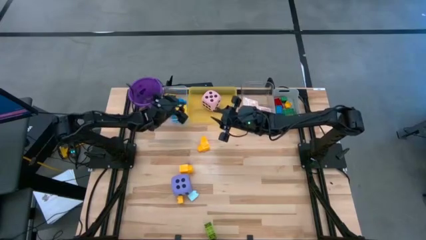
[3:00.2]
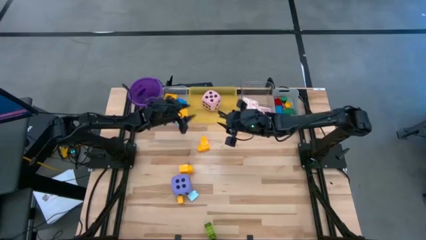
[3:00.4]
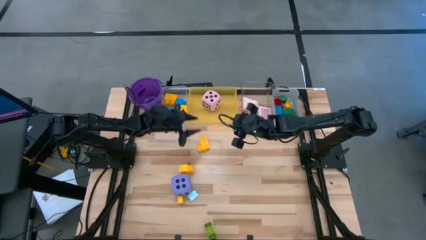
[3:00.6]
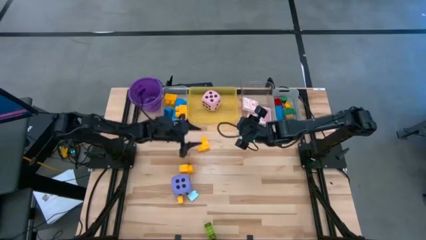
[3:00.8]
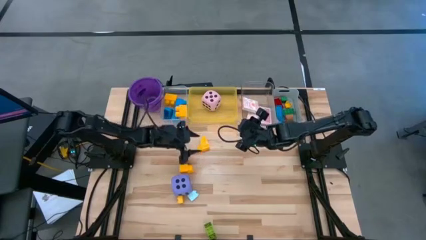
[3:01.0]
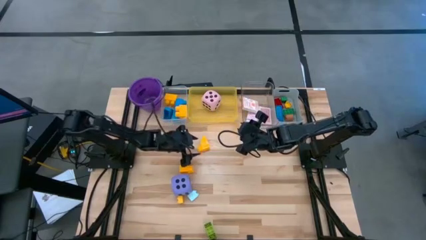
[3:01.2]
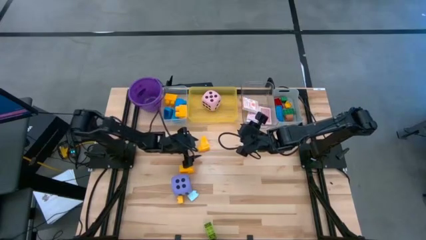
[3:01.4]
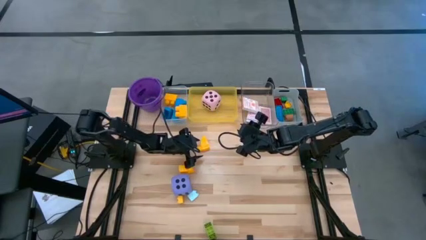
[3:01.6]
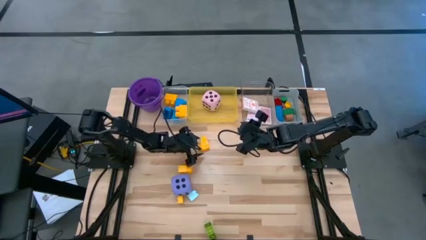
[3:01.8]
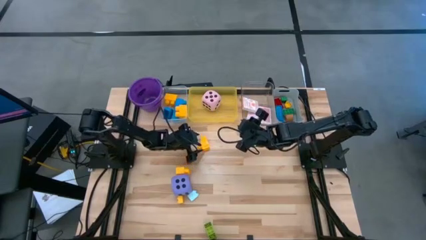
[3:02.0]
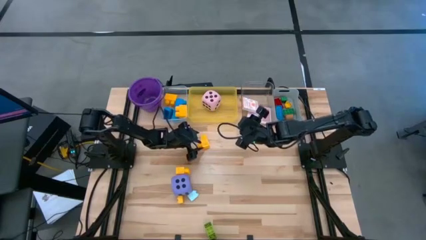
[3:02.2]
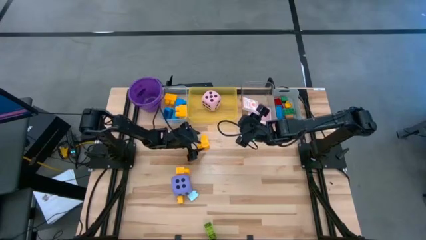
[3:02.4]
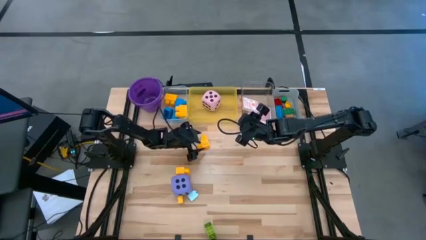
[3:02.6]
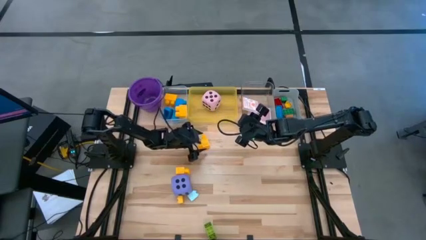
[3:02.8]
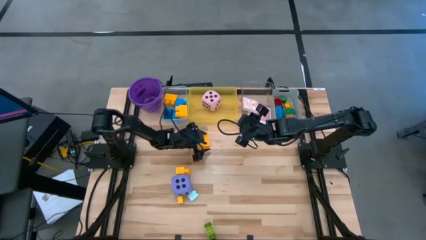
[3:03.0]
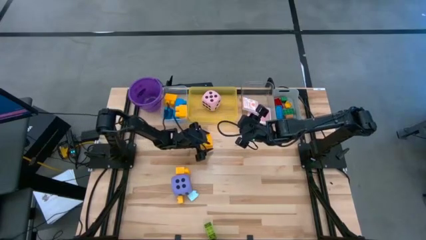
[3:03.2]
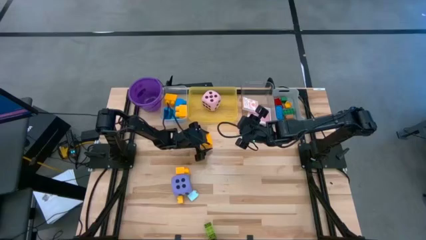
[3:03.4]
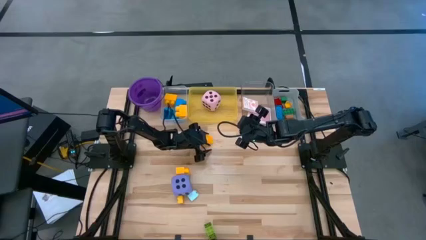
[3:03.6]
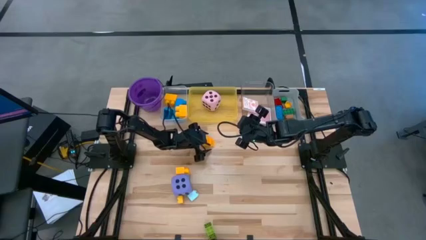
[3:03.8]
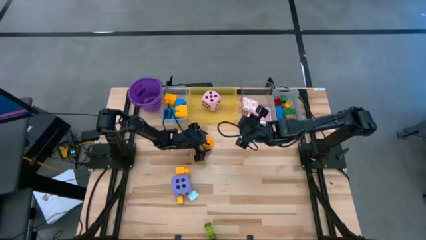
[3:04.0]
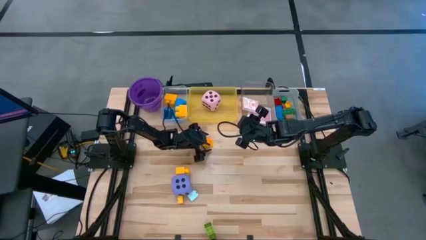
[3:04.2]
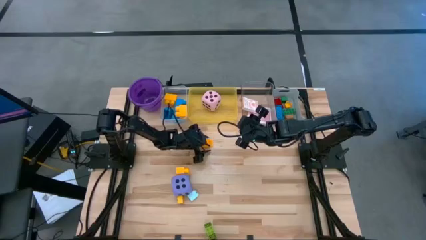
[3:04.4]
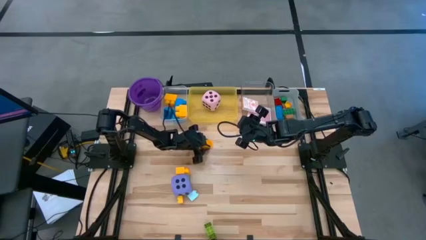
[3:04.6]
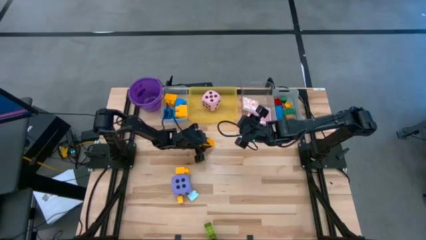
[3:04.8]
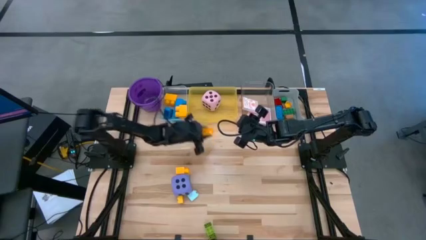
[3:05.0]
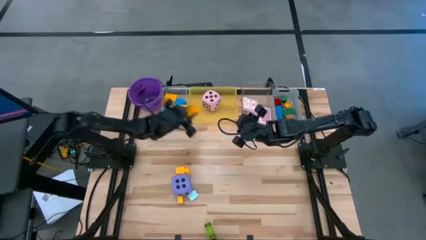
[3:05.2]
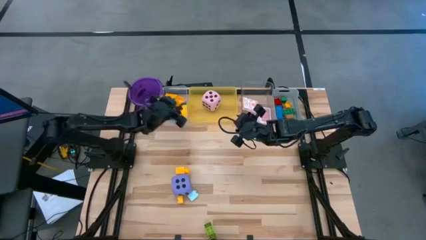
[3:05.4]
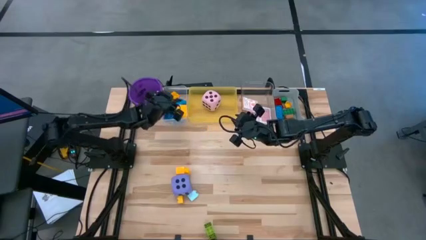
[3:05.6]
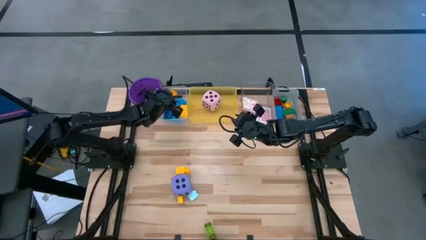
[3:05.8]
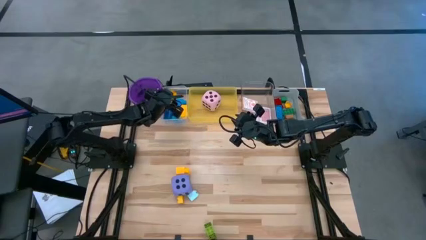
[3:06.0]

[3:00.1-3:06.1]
Task: Pick & Place Toys
Put the top large yellow game piece into the white transparent bin

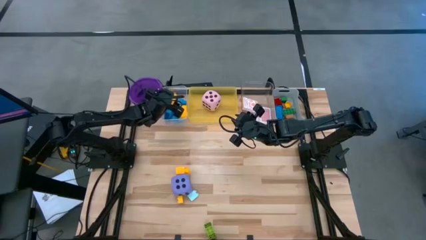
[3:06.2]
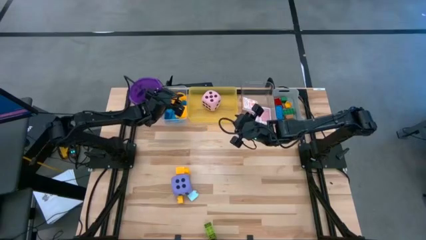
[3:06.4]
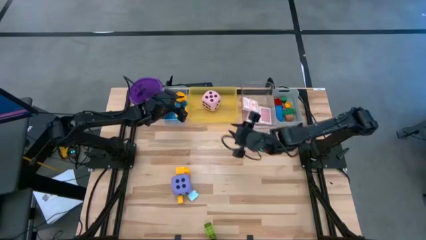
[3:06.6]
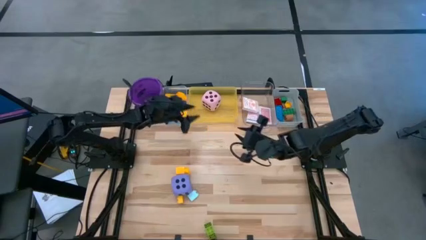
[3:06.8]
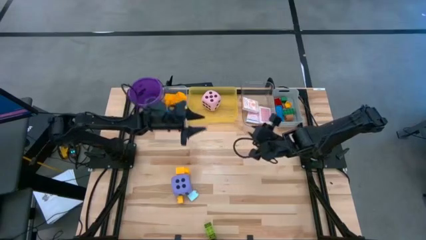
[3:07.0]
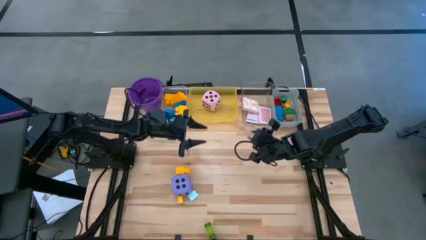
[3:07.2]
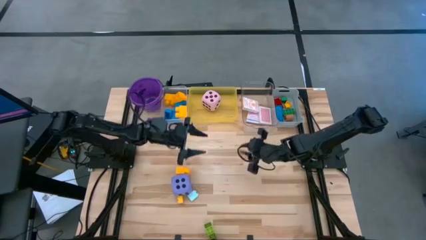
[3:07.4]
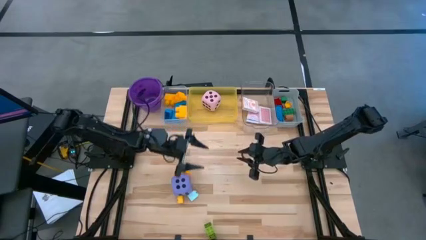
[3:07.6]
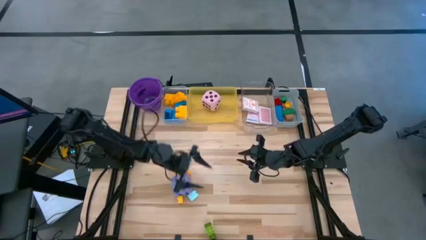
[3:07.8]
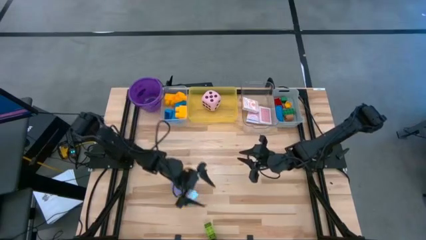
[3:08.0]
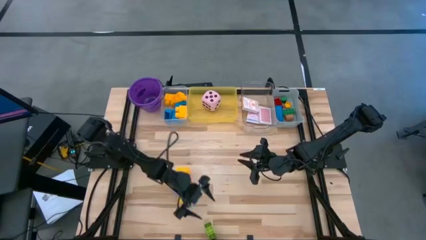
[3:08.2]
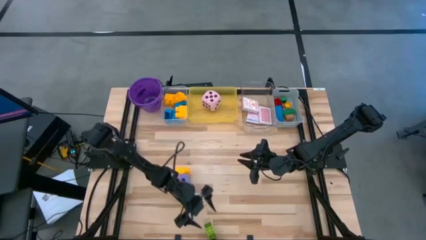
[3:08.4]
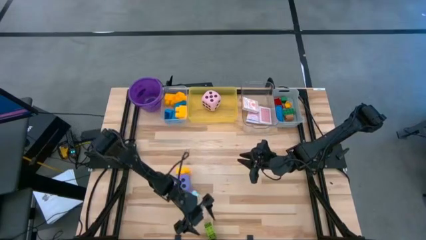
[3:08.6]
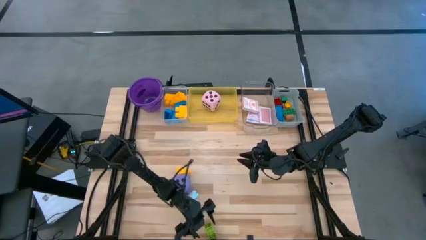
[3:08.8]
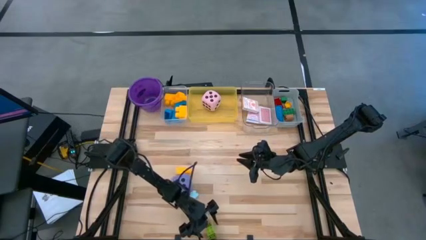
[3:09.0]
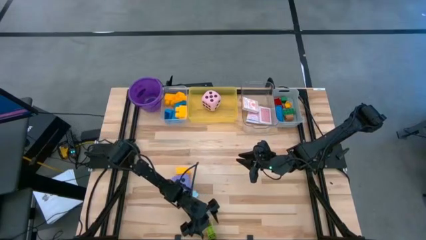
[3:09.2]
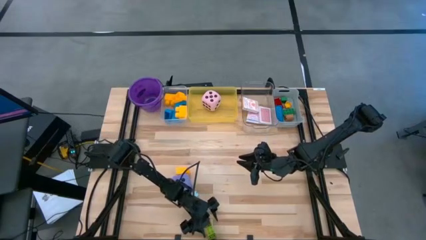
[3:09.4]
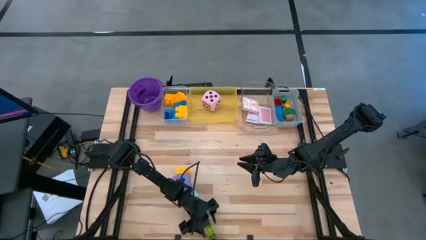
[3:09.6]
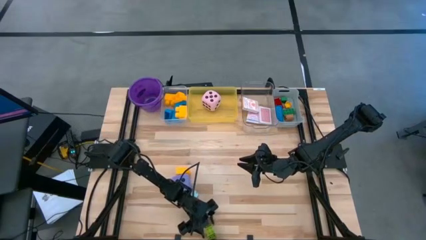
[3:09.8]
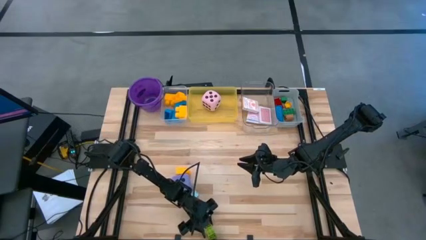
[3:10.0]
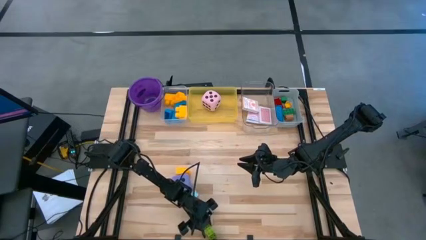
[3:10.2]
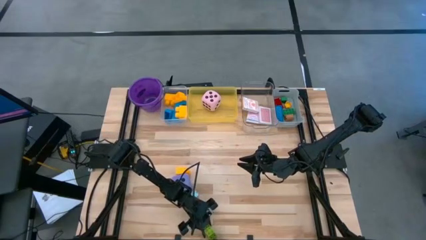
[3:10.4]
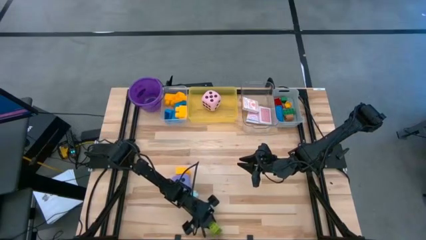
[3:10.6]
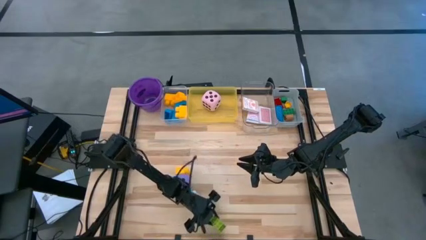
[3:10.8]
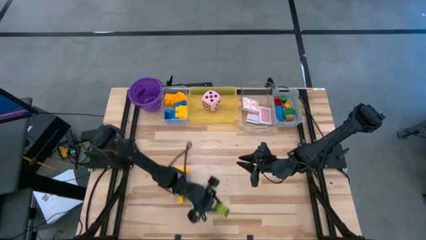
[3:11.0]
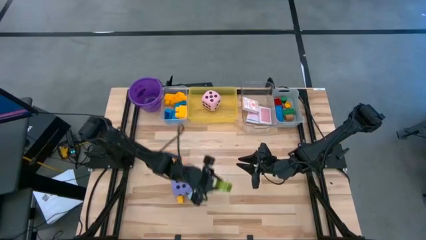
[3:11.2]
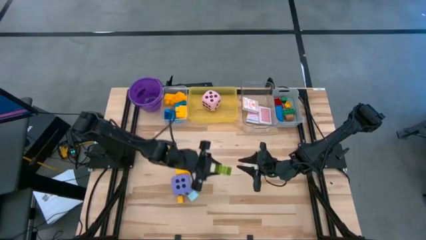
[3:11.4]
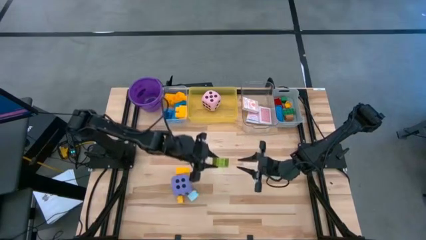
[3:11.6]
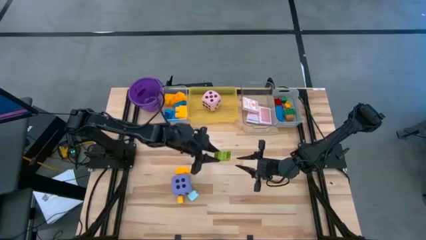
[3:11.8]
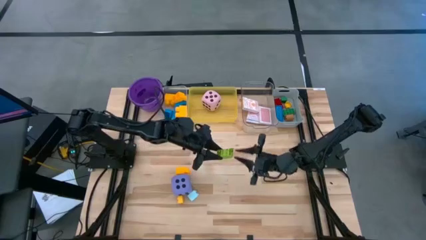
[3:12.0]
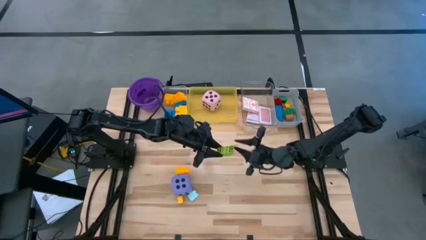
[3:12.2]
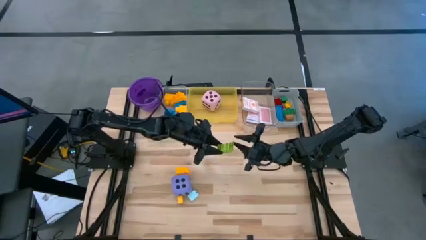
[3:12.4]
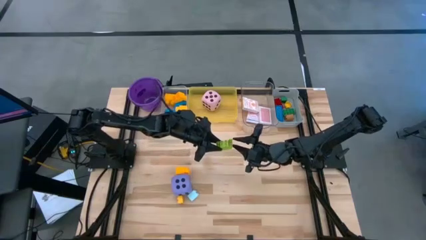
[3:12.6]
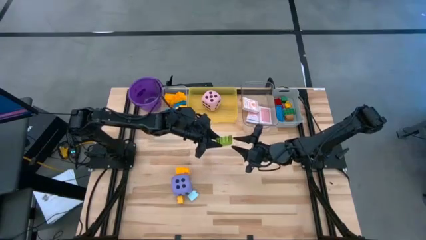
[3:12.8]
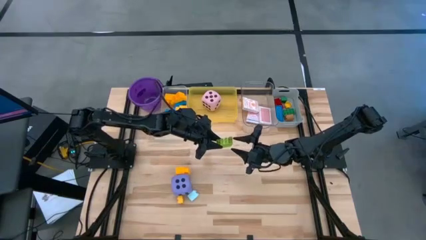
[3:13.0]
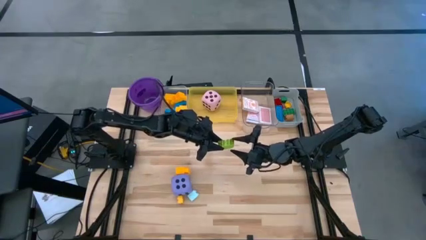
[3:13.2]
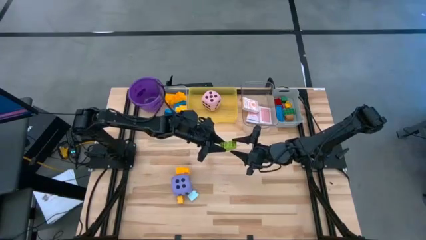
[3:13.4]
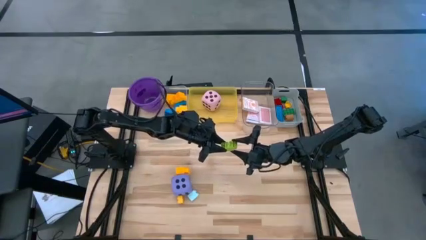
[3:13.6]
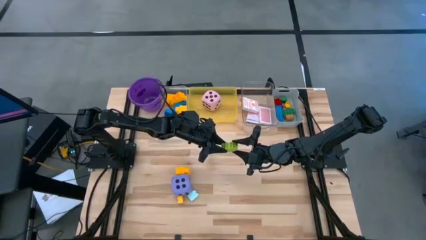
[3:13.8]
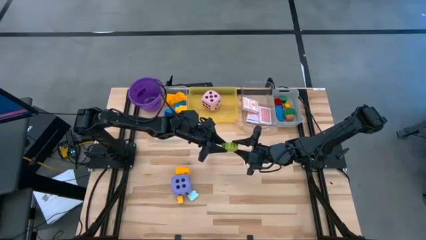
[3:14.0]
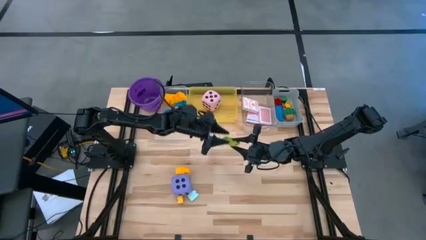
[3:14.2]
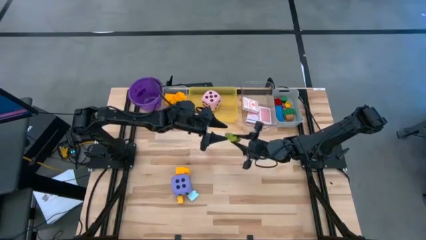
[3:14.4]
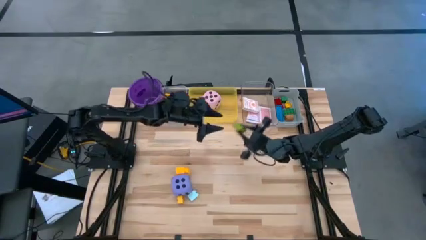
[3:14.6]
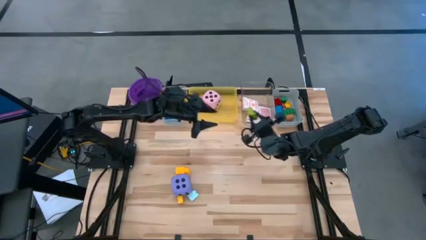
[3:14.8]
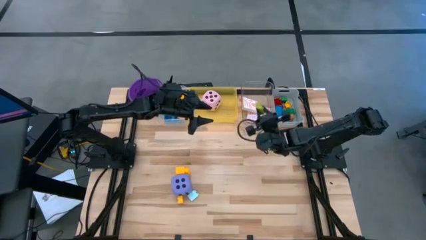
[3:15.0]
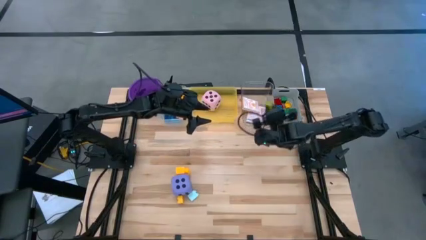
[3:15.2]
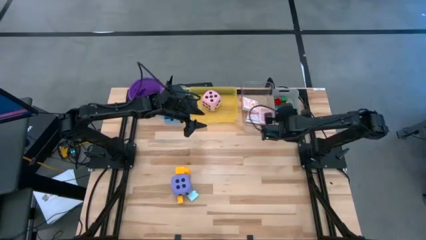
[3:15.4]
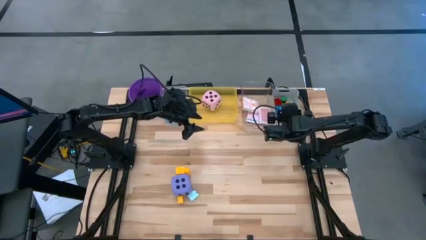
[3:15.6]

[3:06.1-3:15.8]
Put the small green game piece into the gray bin
